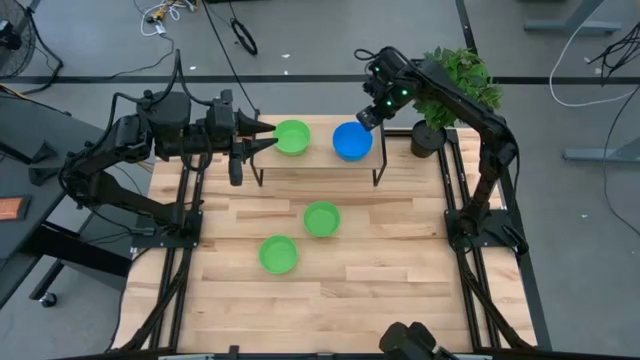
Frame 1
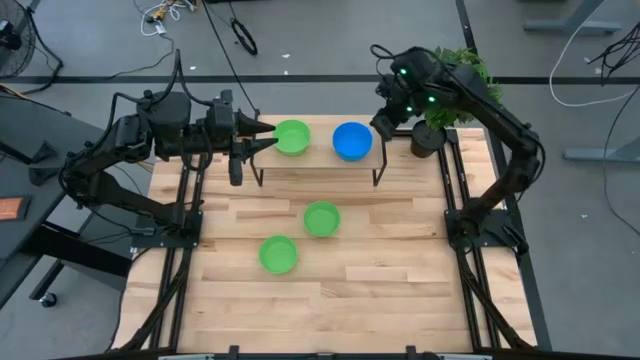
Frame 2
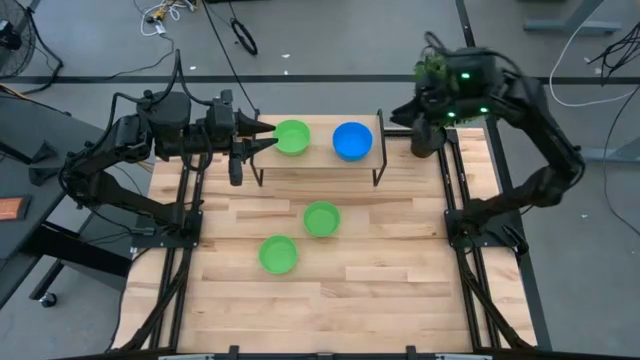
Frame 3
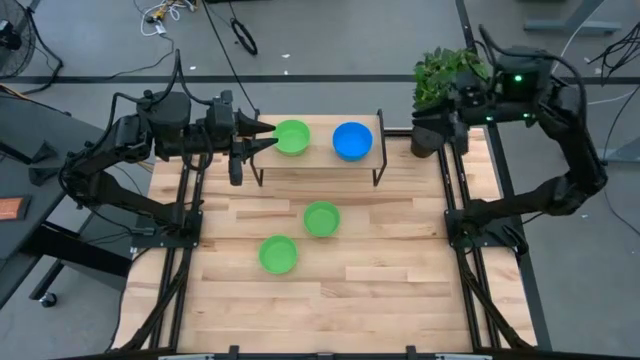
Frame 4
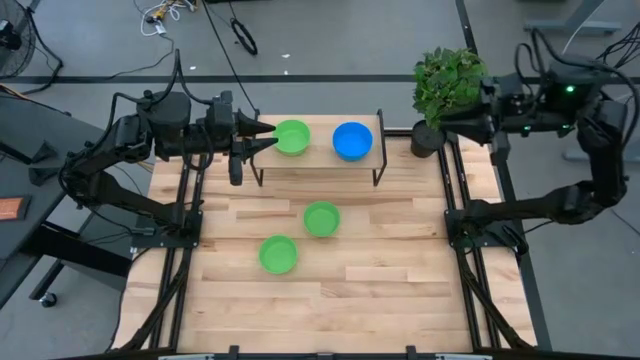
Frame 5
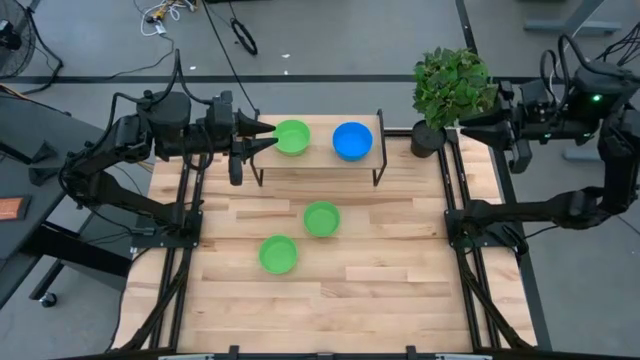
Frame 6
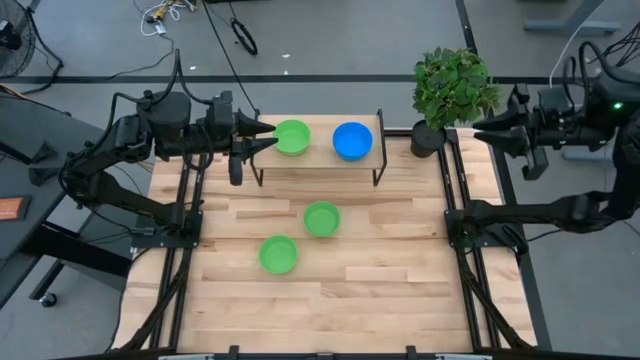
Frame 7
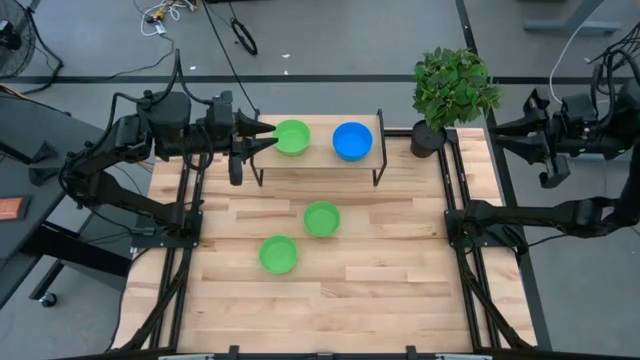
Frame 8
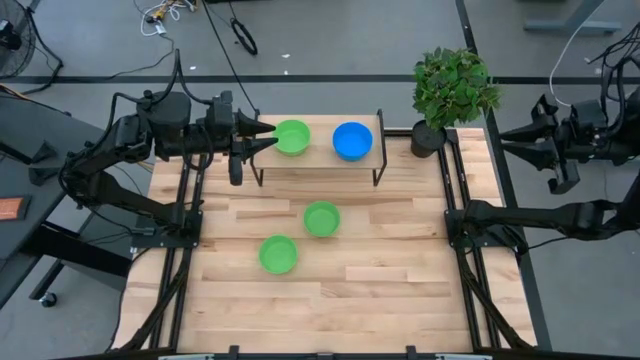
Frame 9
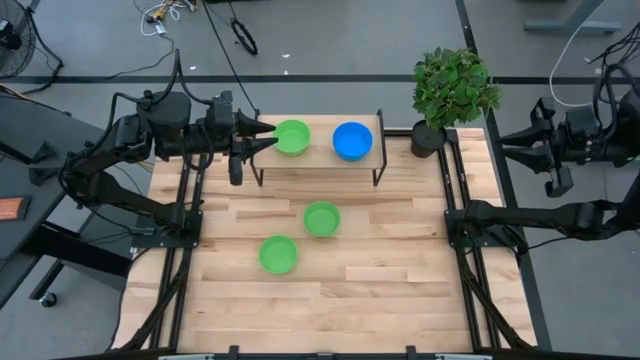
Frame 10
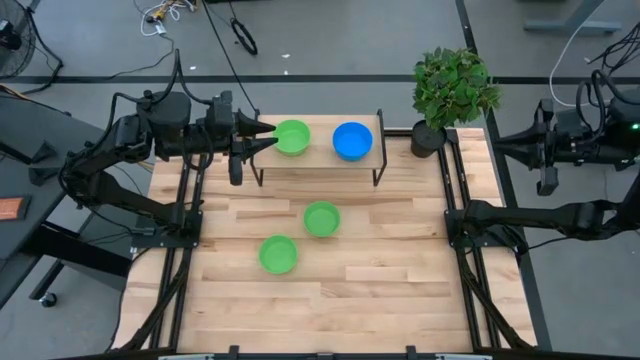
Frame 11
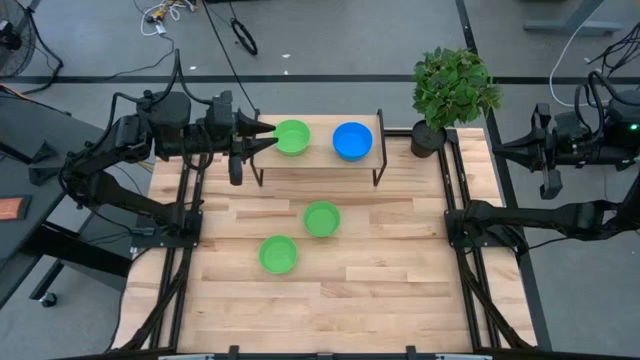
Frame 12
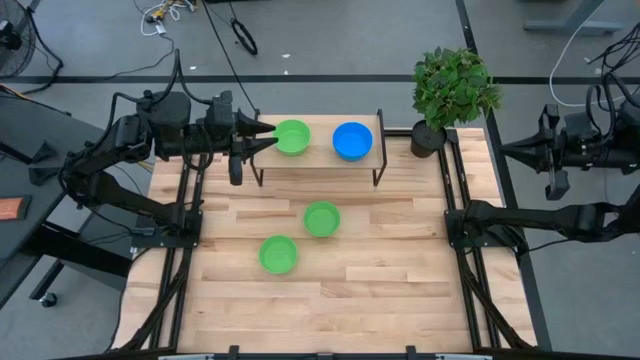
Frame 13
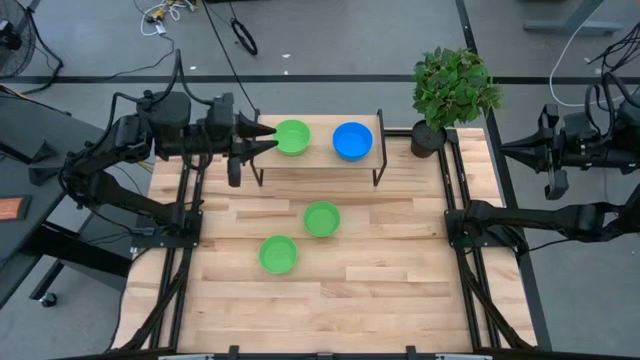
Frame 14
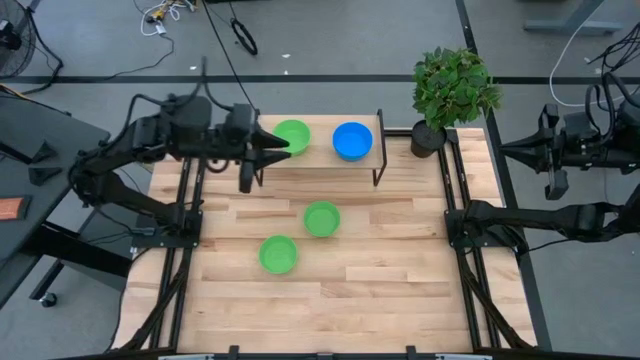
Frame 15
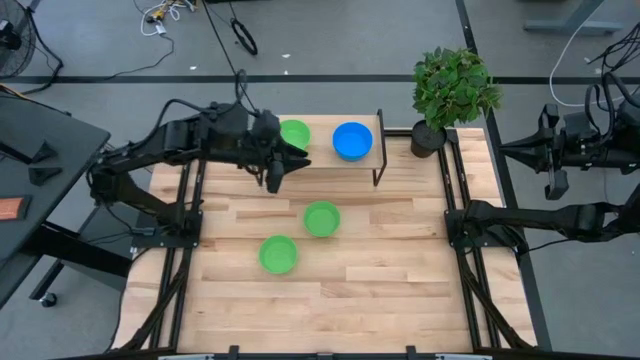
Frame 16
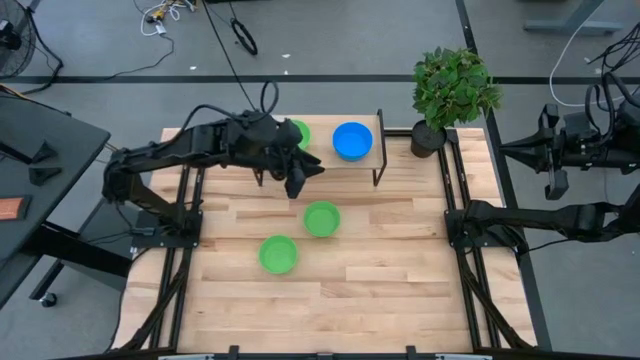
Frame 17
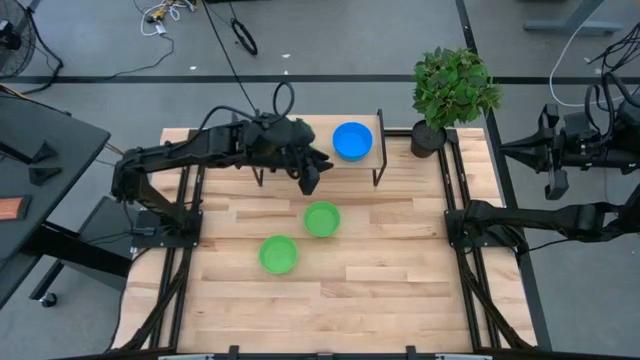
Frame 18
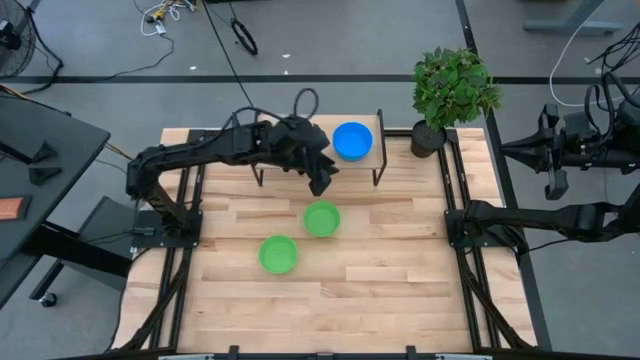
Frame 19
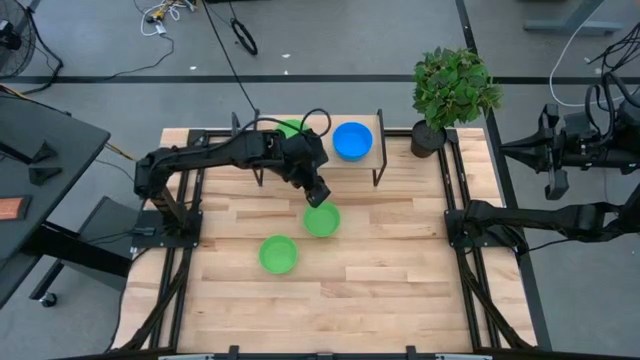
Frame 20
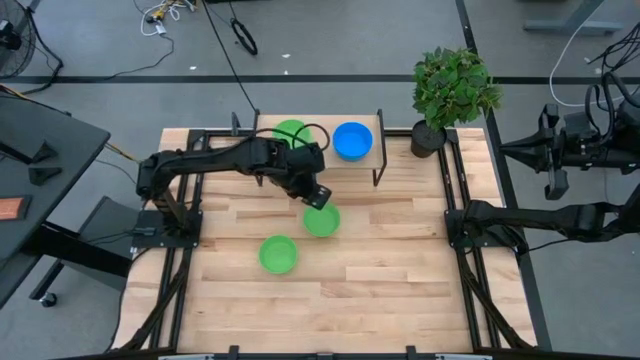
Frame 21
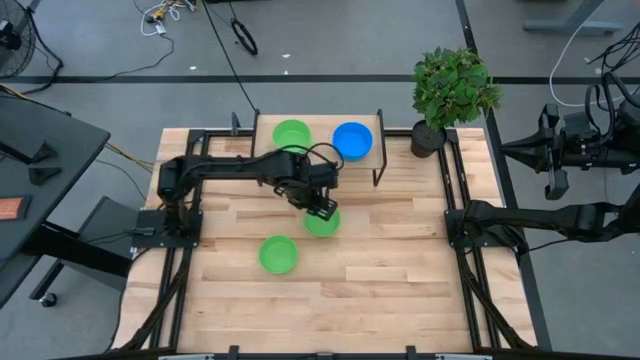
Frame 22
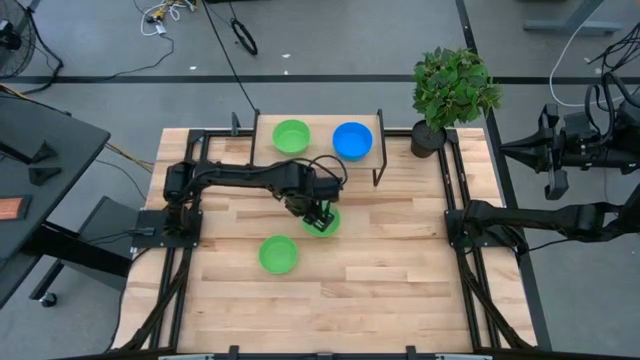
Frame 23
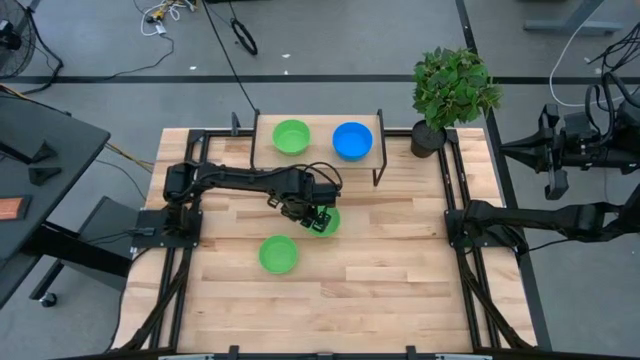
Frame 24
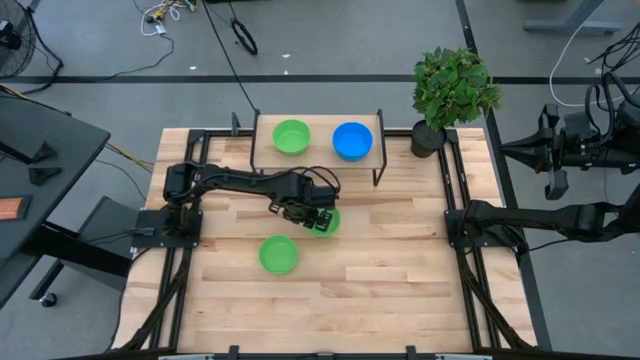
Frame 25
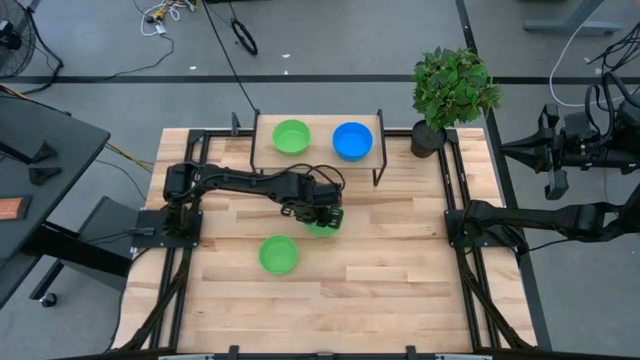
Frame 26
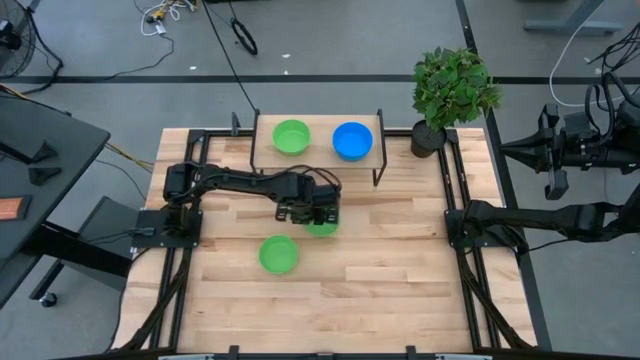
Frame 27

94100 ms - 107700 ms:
Task: Pick & Place Mini bowls
Stack the top green bowl on the green bowl on the shelf

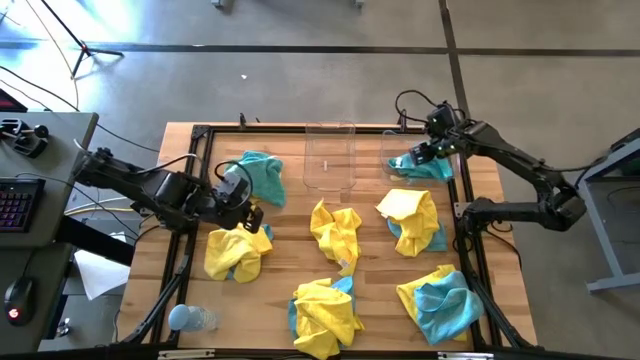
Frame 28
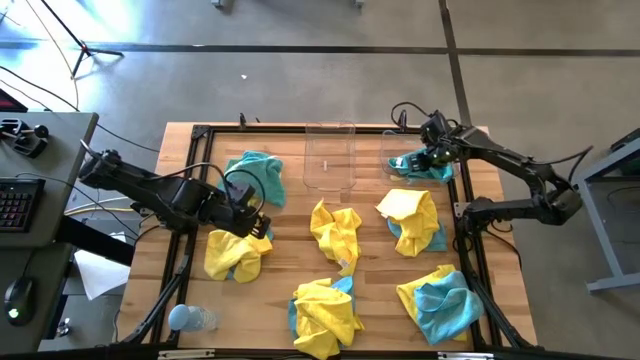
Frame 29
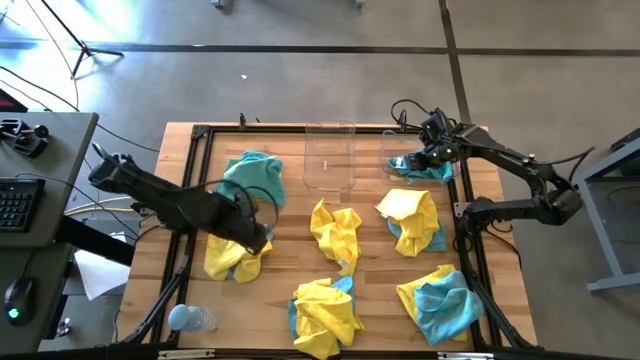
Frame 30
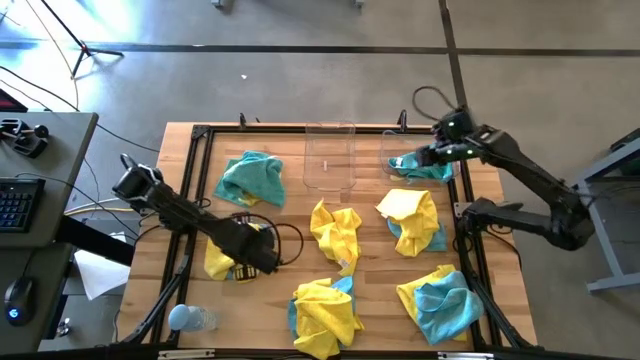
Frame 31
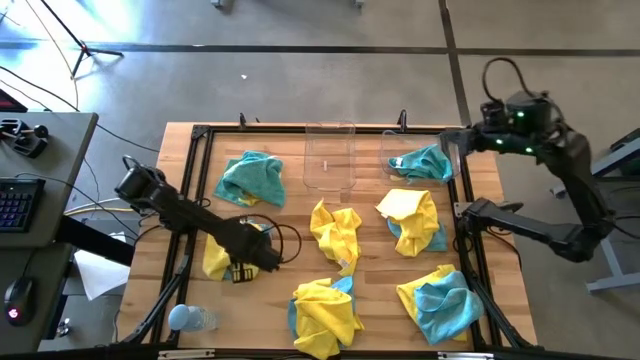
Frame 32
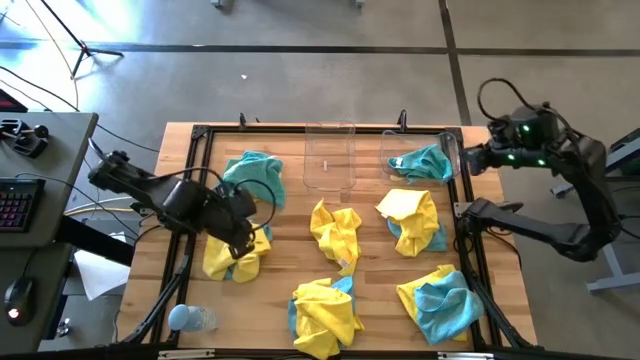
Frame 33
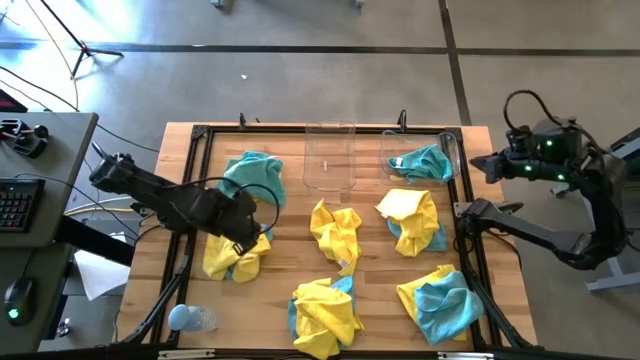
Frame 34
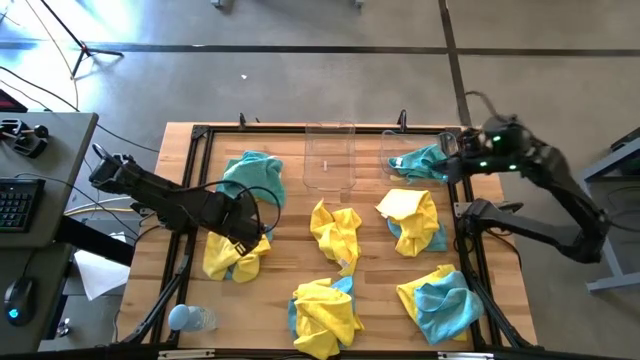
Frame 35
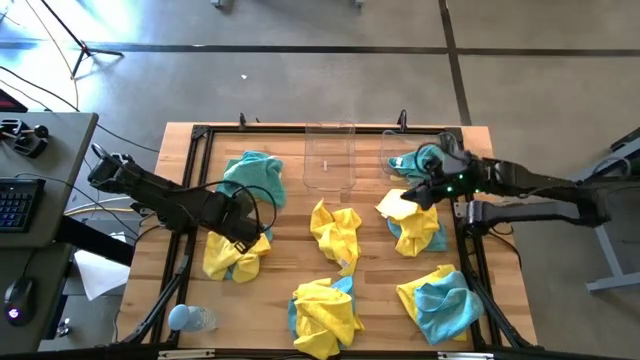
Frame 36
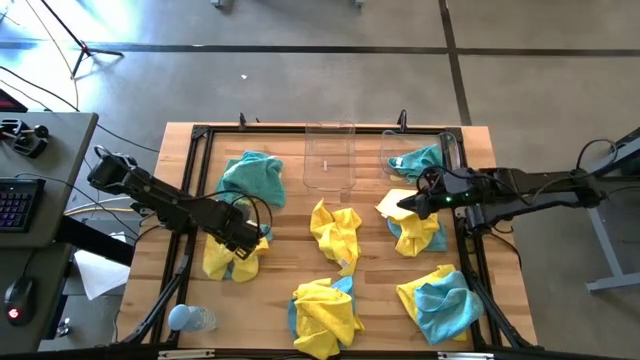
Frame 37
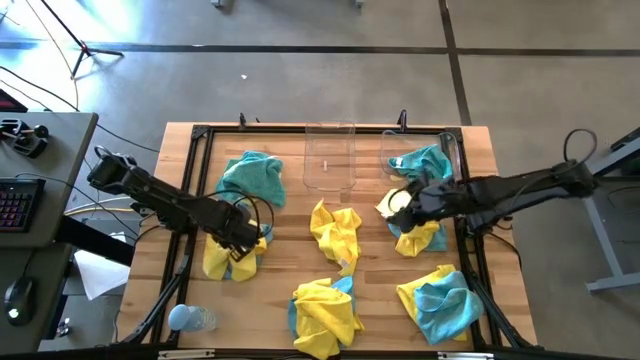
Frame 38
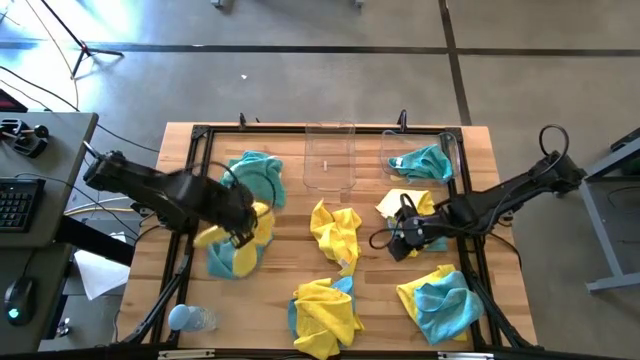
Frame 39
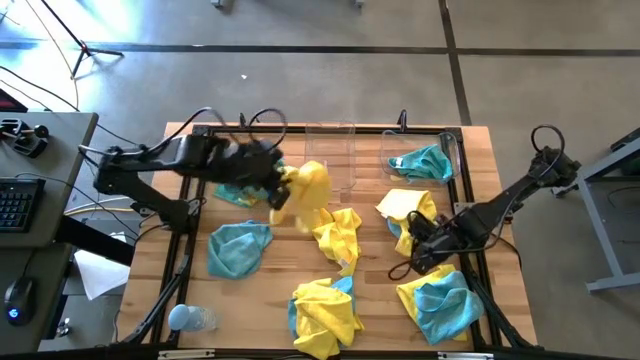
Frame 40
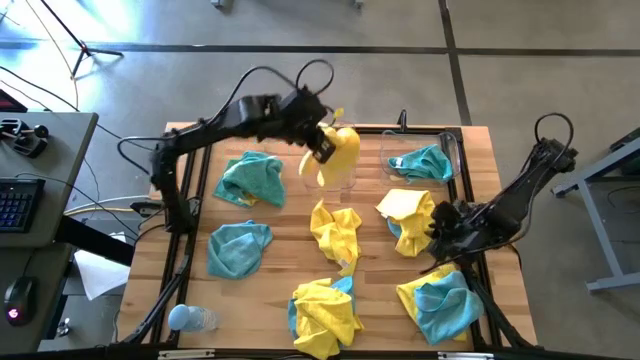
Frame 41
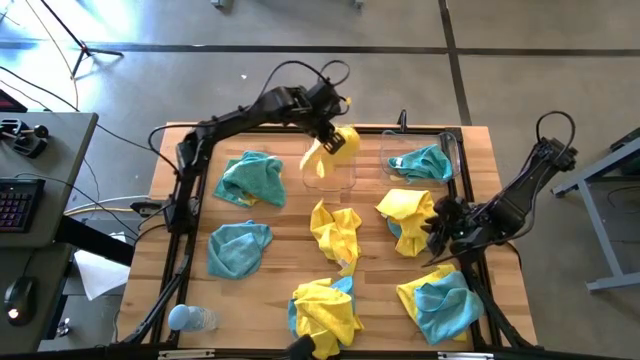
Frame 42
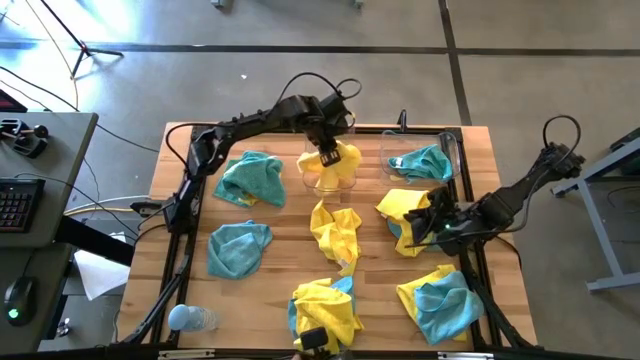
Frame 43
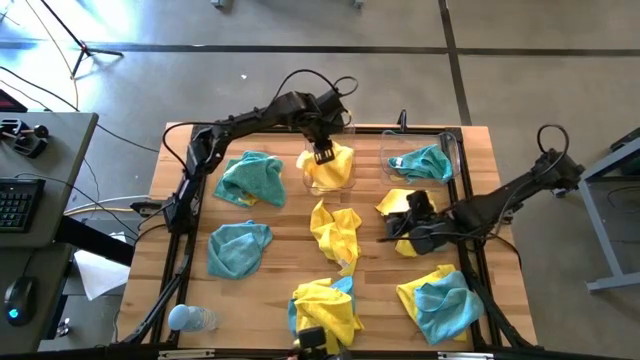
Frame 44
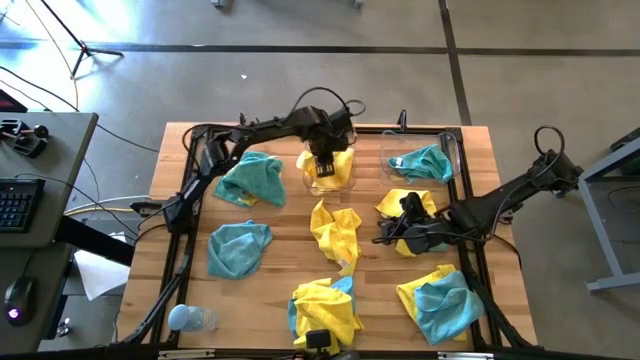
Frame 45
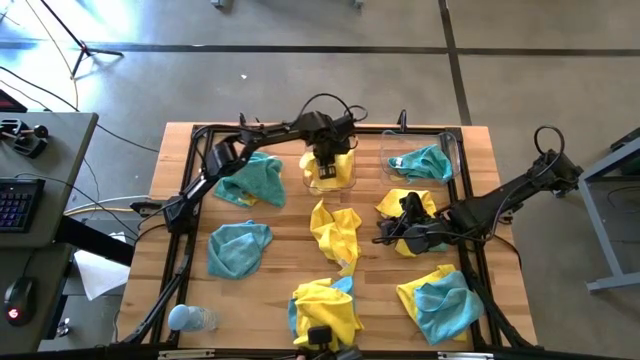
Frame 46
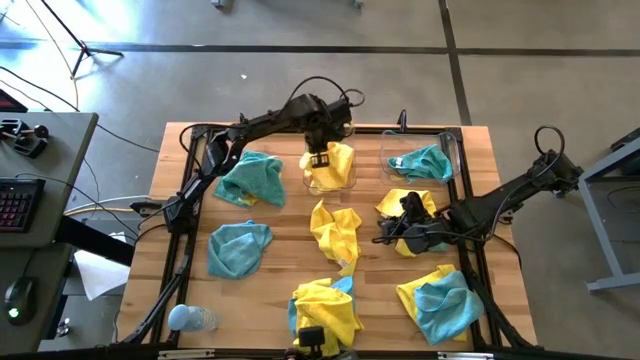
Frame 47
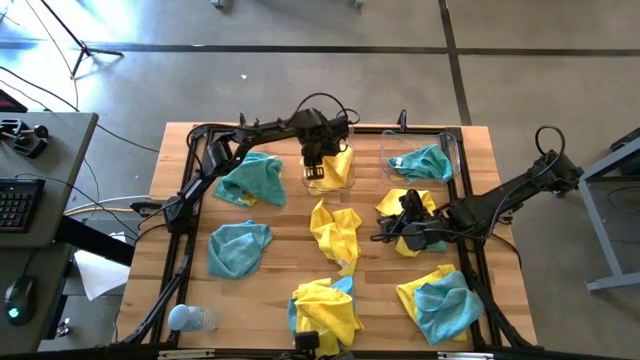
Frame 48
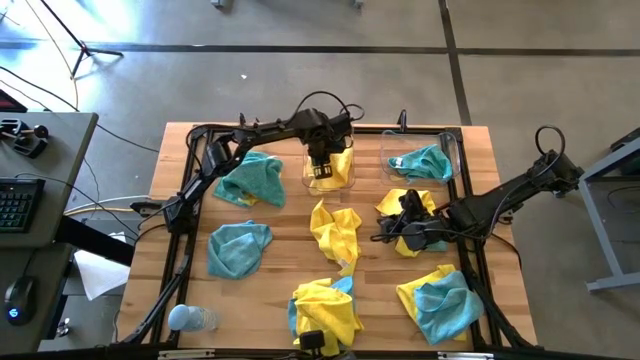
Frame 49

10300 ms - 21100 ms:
Task: Sort microfiber towel by color & place in baskets
Put the yellow towel into the left transparent bin
